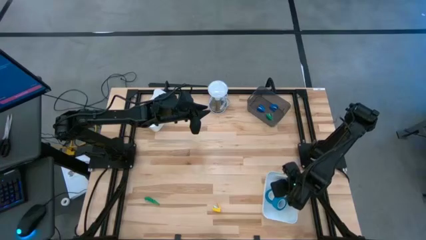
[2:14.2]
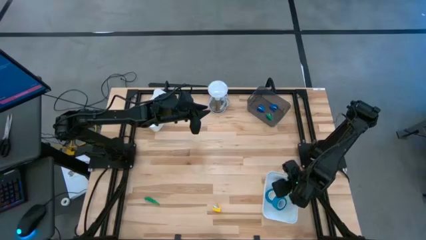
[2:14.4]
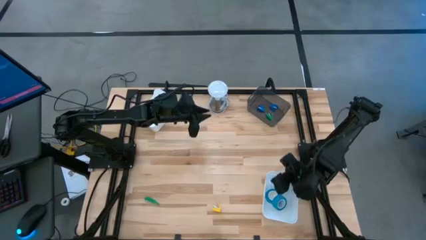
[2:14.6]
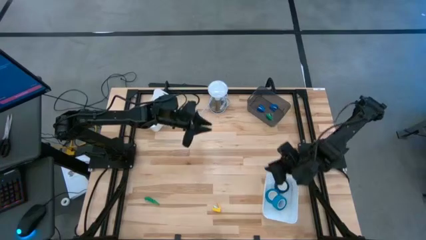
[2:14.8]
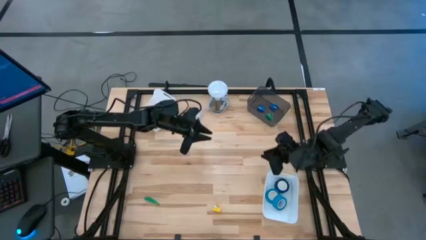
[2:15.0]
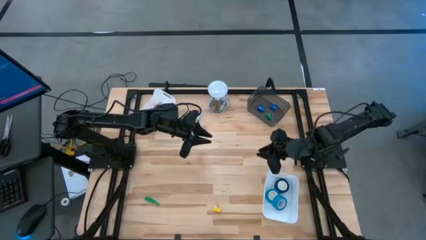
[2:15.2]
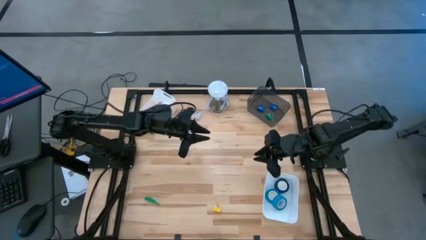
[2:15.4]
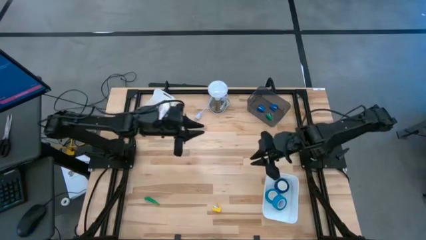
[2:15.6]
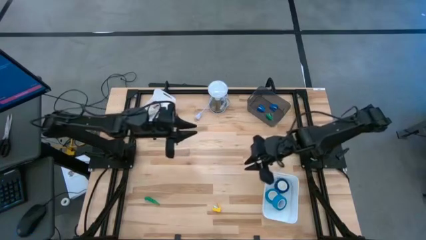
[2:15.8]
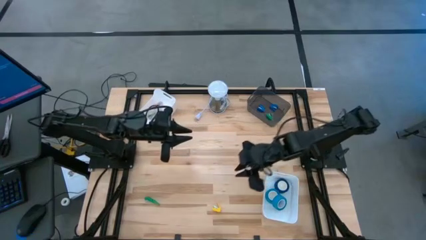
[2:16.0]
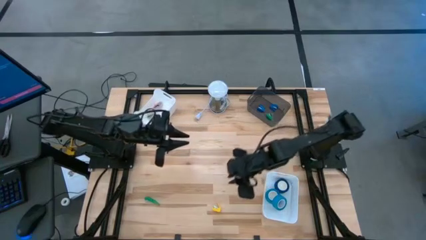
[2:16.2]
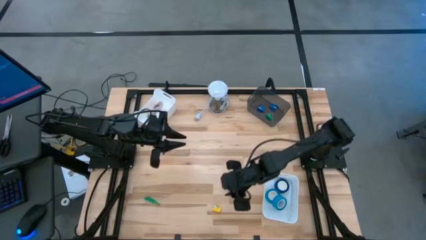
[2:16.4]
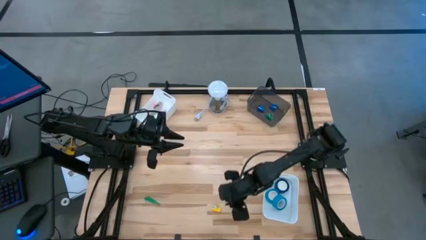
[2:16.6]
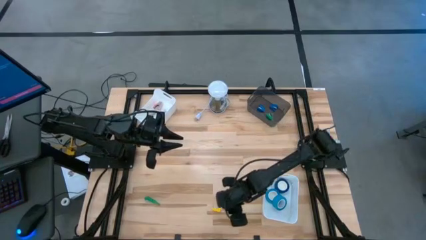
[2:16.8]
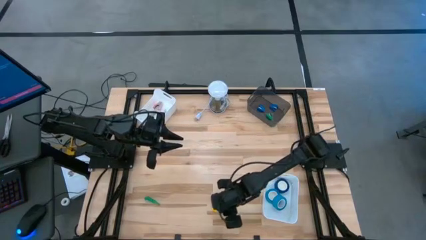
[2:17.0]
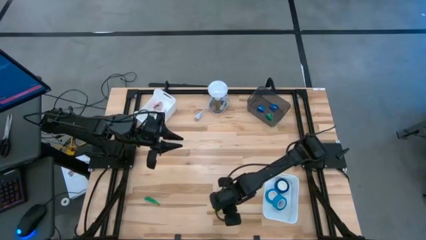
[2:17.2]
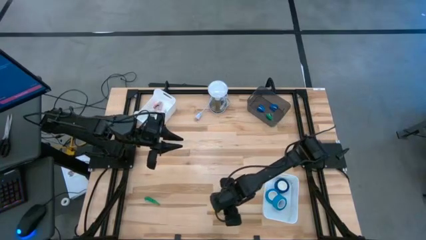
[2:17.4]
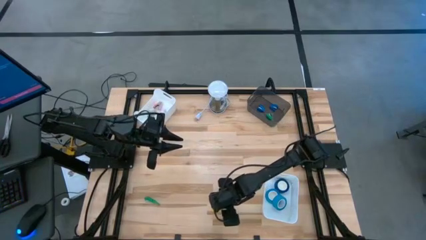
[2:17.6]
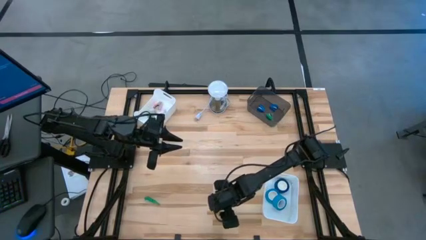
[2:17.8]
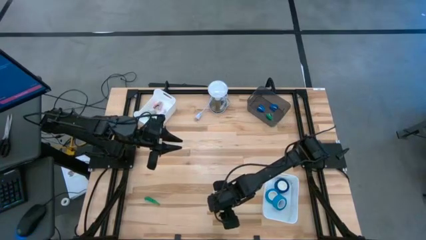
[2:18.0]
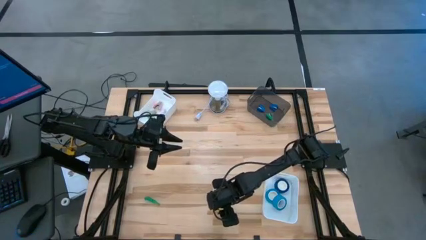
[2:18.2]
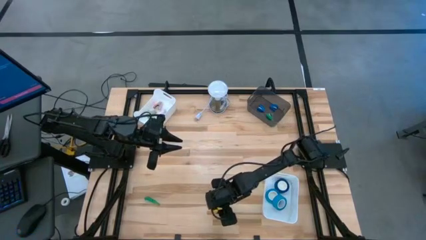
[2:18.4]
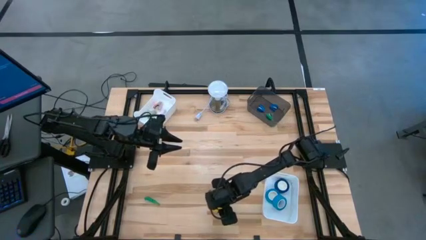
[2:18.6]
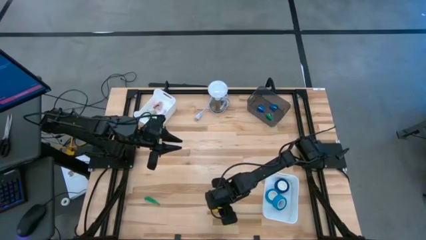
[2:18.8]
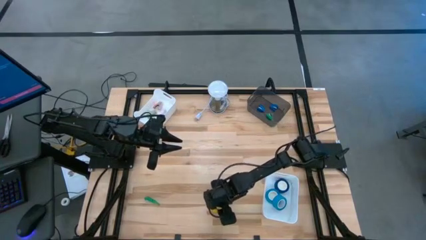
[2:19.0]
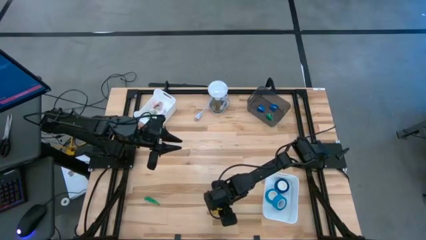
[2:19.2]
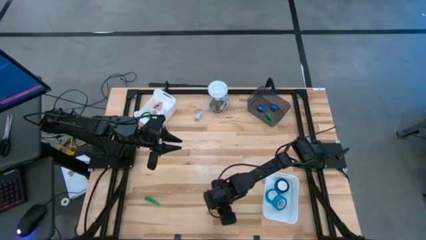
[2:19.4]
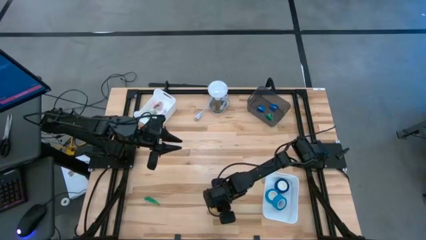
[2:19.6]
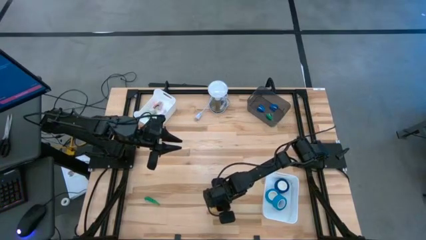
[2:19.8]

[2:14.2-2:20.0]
Task: Pick and place Stapler, Stapler remover, tape
Put the yellow stapler into the black bin

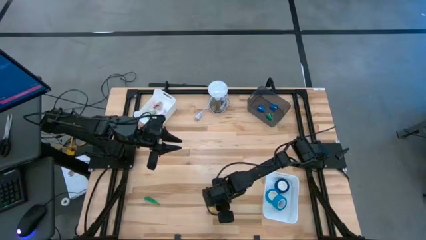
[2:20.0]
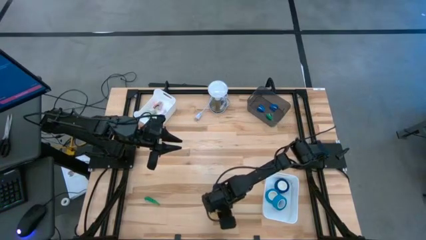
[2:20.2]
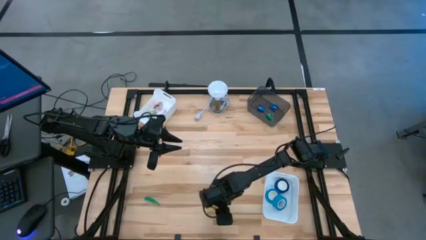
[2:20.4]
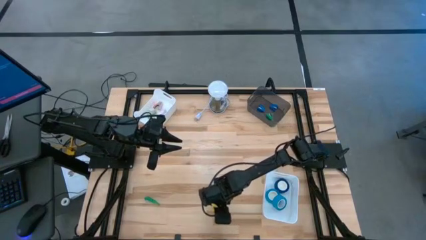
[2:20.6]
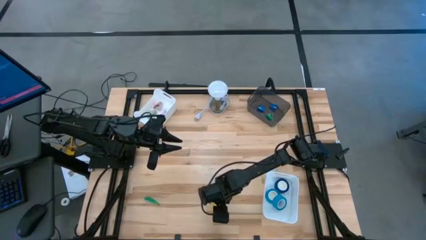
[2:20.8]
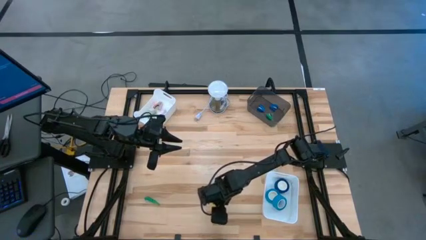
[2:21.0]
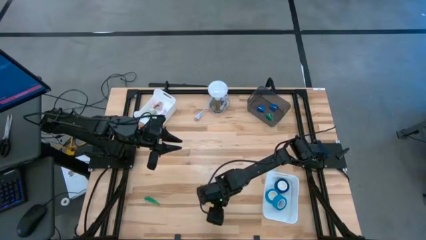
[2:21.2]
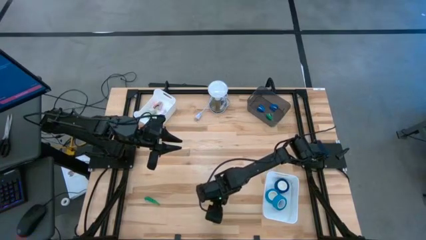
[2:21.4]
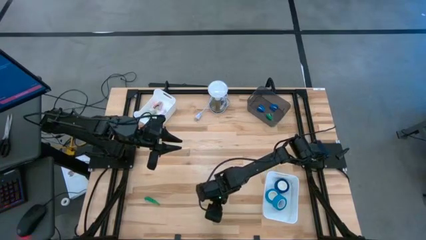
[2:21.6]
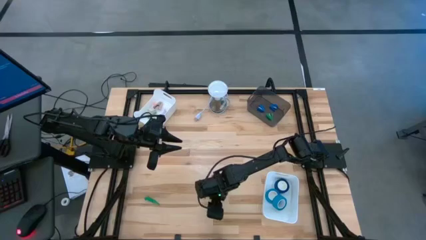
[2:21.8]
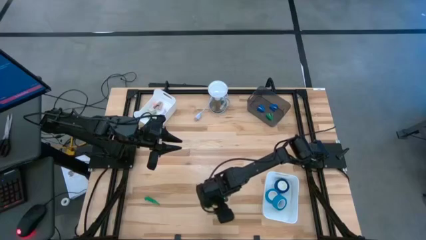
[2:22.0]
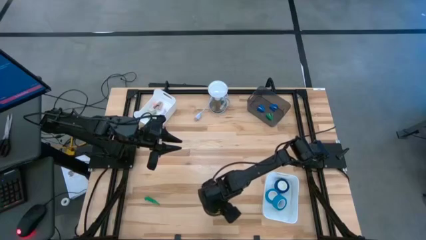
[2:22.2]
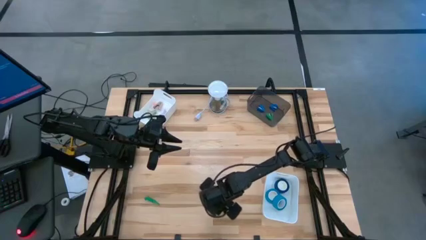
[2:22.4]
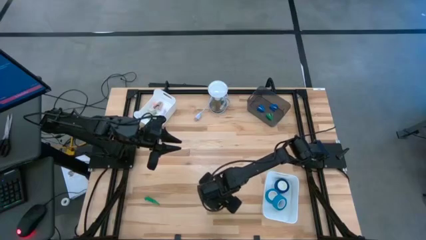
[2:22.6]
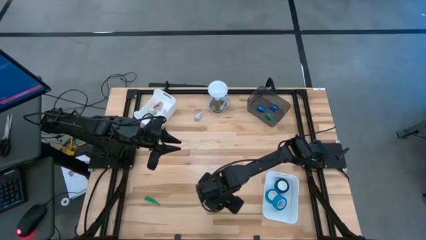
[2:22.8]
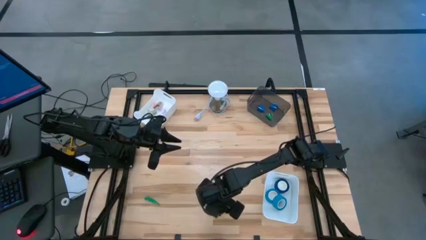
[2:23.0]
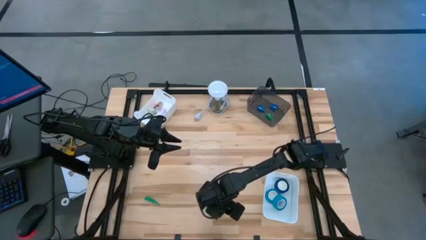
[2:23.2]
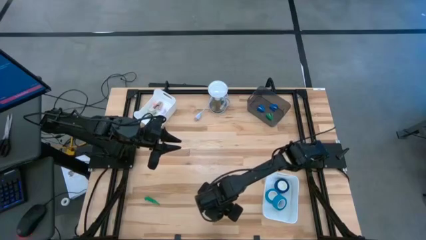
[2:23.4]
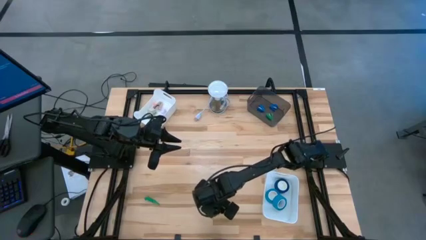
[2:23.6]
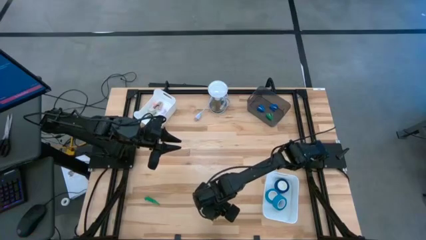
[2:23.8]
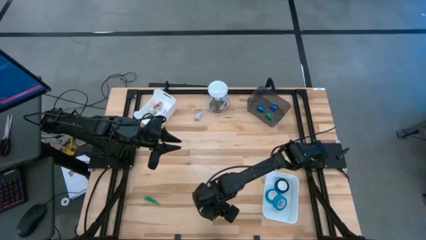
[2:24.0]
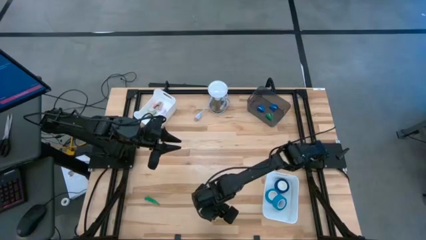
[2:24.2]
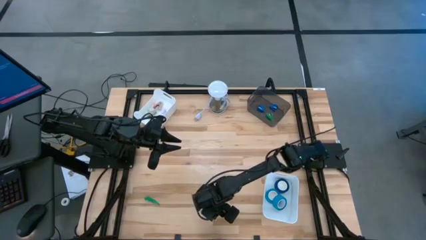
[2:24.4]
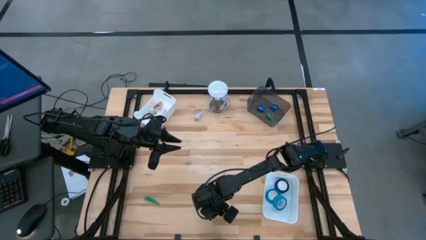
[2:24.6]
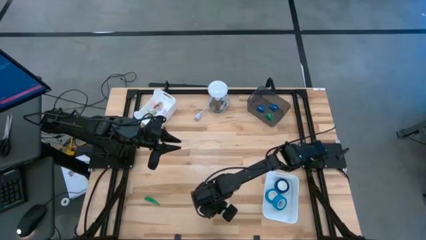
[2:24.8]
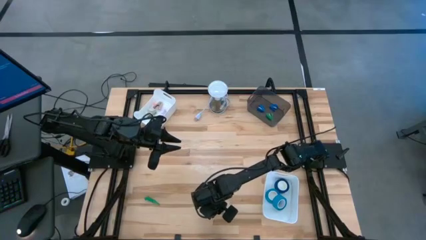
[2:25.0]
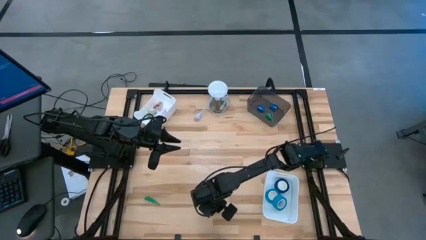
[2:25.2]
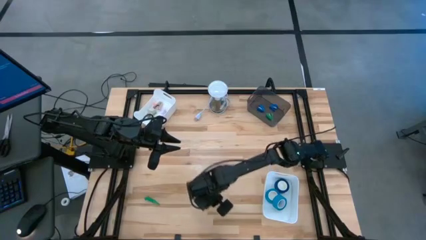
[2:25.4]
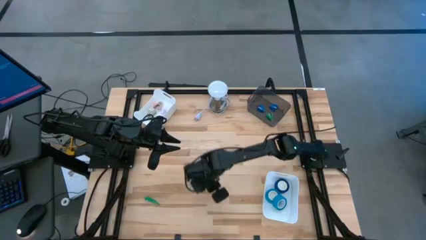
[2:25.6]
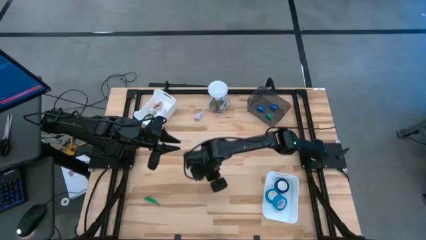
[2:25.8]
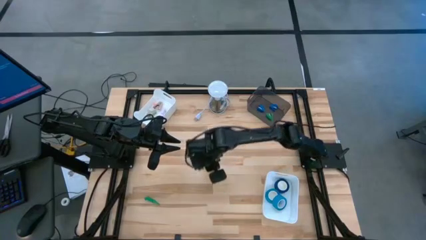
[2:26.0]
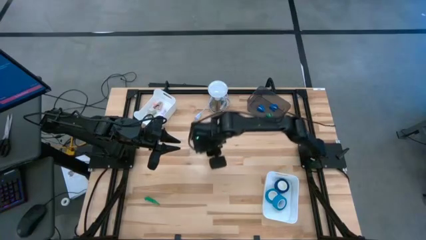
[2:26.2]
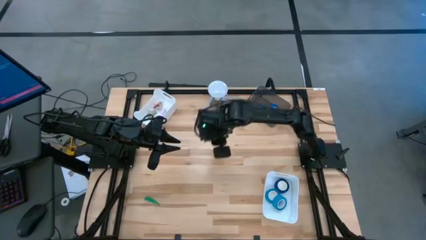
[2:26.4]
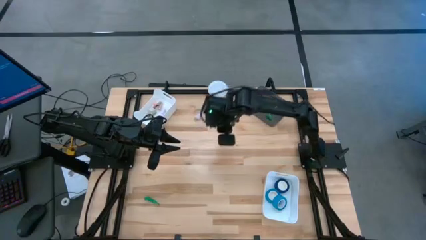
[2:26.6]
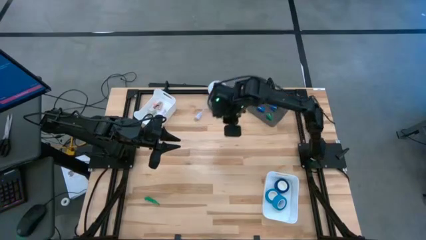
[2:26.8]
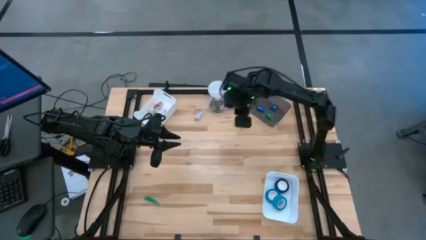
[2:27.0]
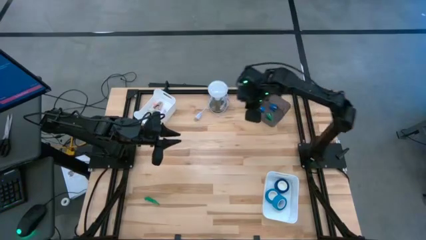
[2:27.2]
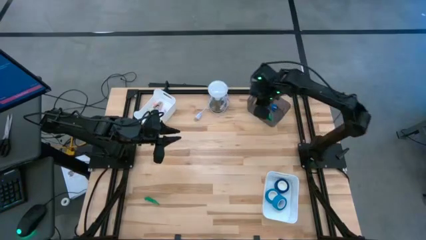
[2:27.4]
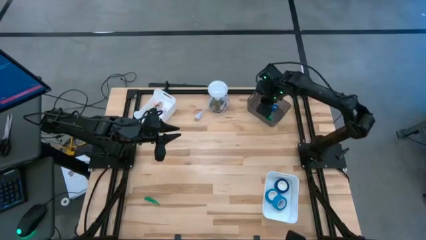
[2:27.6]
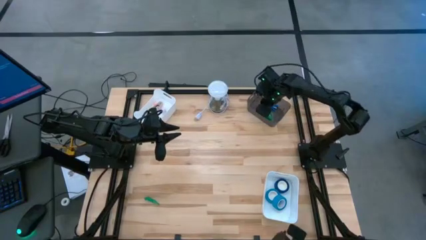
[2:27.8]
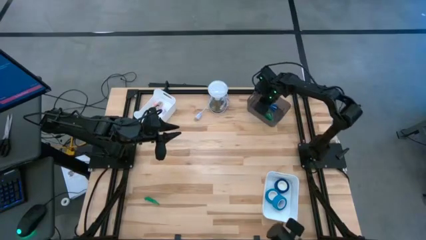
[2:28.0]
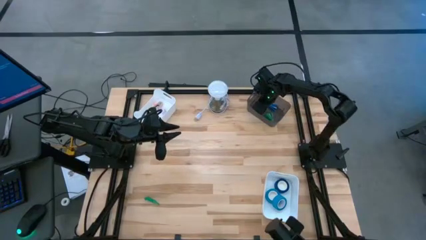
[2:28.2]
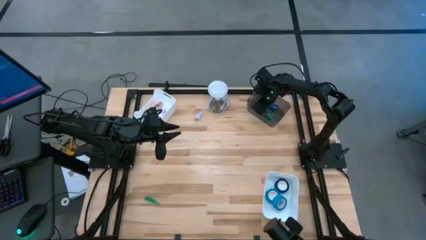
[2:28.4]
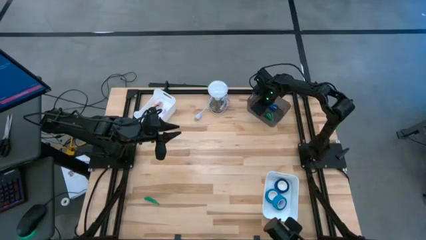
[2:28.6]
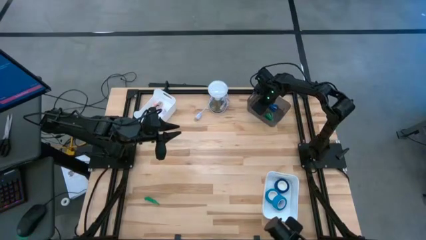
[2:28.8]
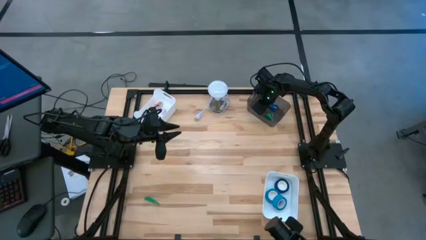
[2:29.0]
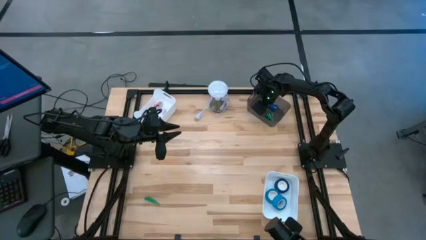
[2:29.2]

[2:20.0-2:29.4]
Put the yellow stapler into the black bin
